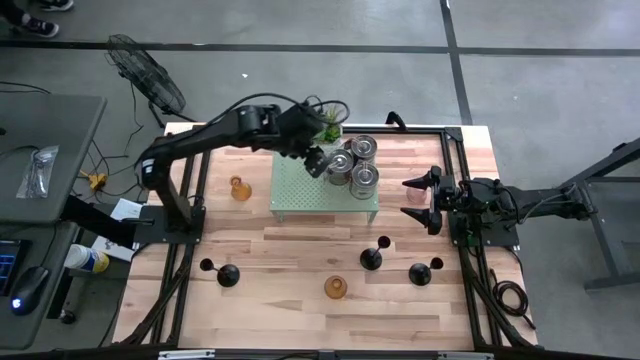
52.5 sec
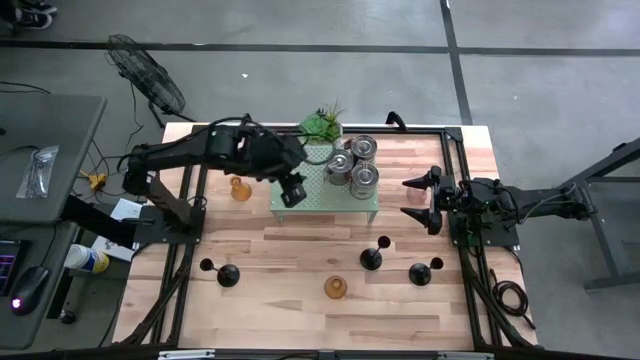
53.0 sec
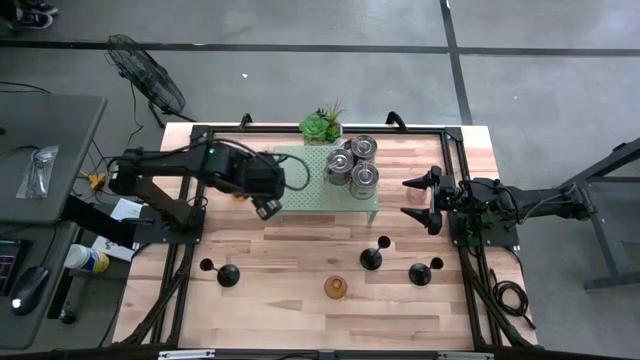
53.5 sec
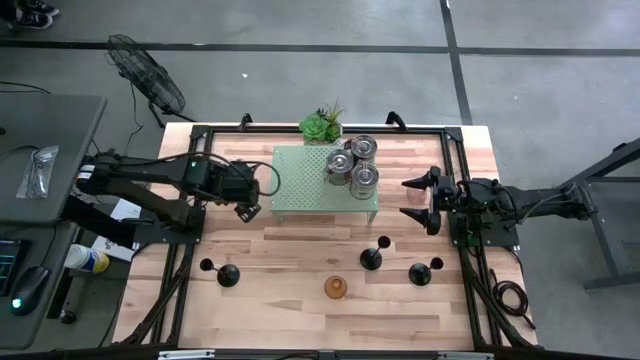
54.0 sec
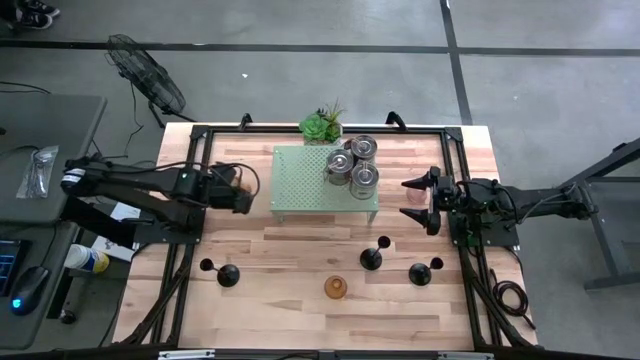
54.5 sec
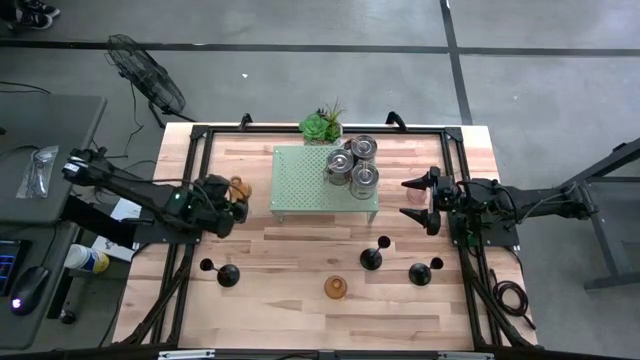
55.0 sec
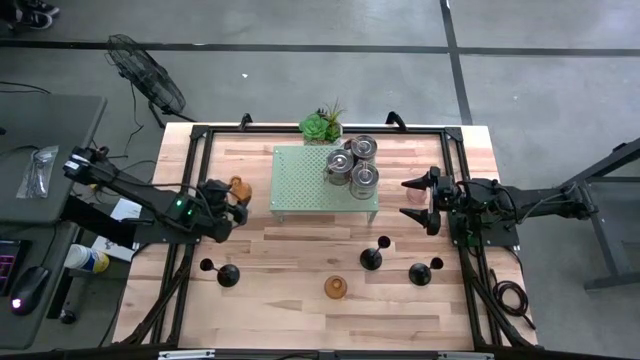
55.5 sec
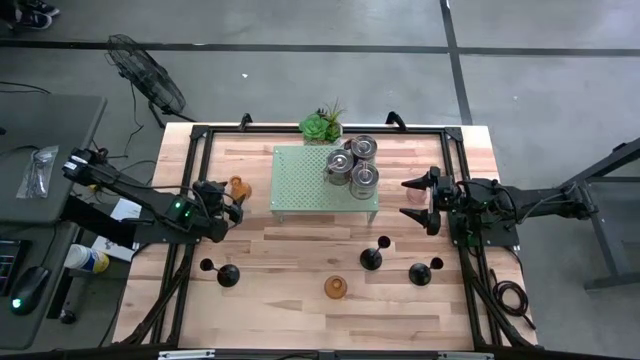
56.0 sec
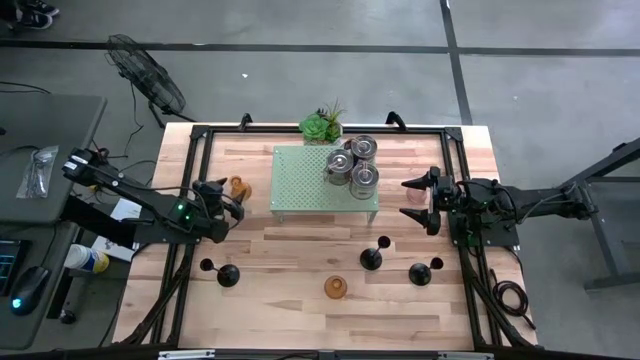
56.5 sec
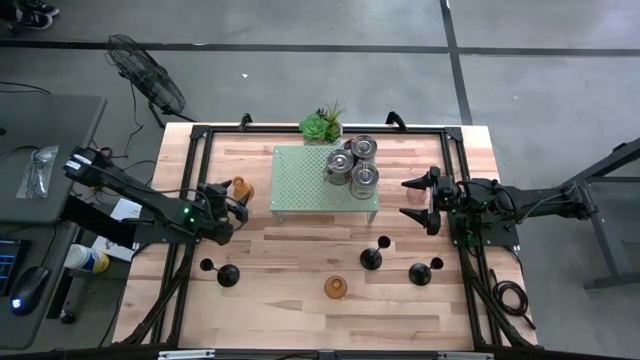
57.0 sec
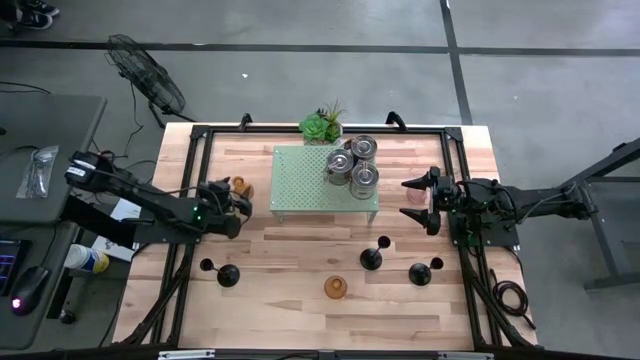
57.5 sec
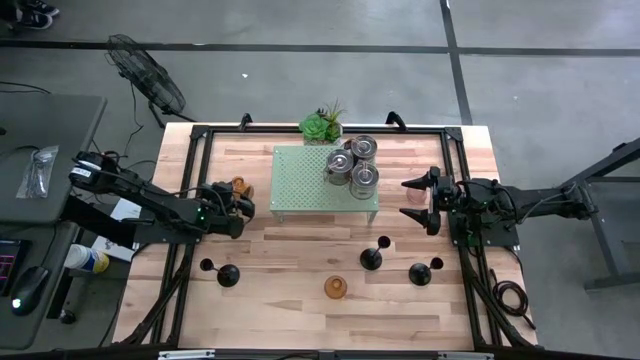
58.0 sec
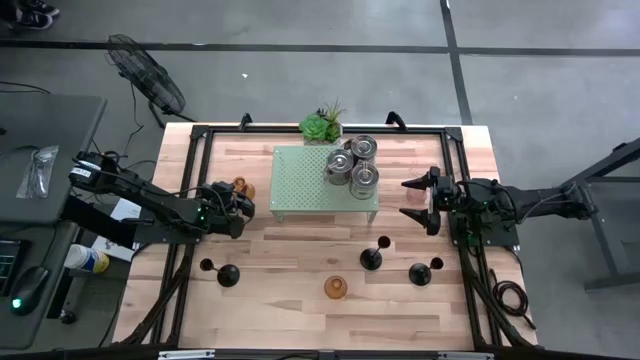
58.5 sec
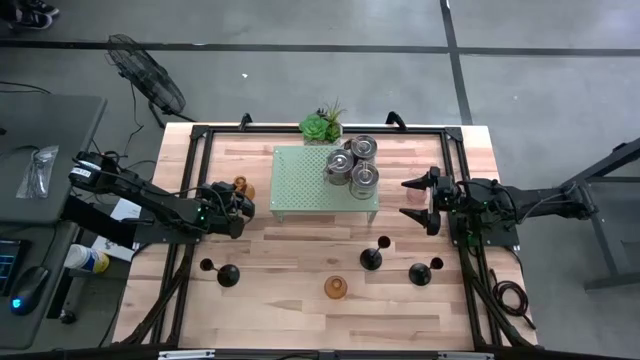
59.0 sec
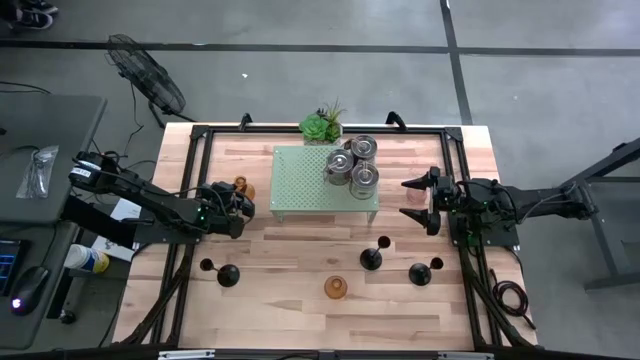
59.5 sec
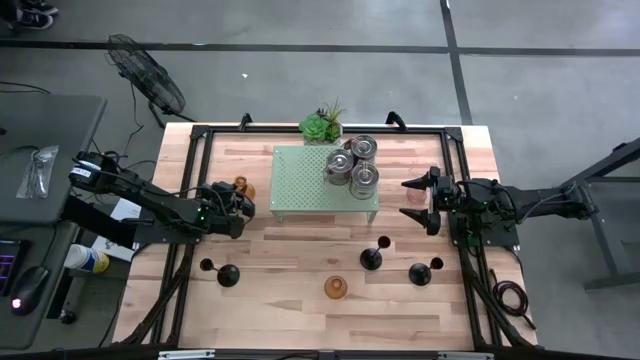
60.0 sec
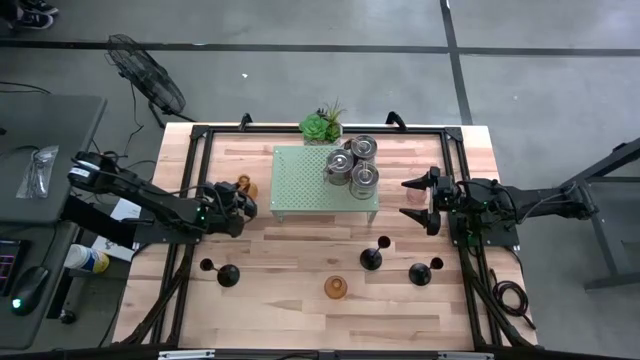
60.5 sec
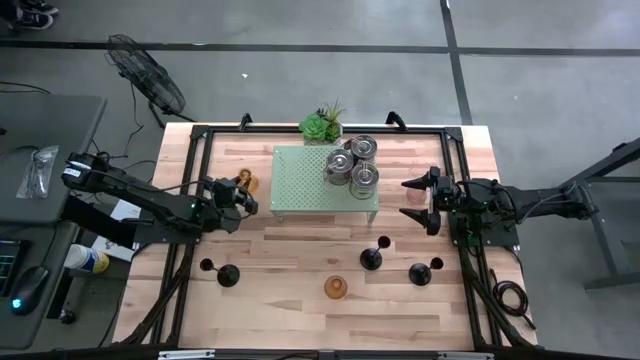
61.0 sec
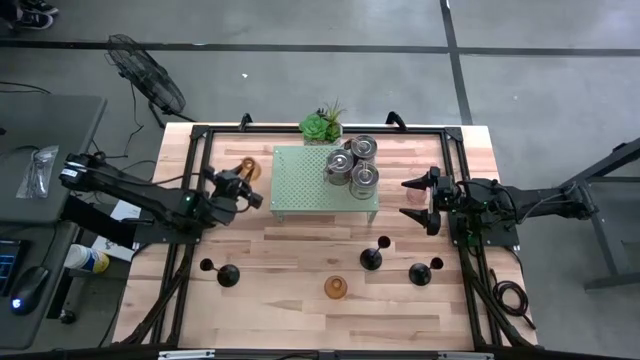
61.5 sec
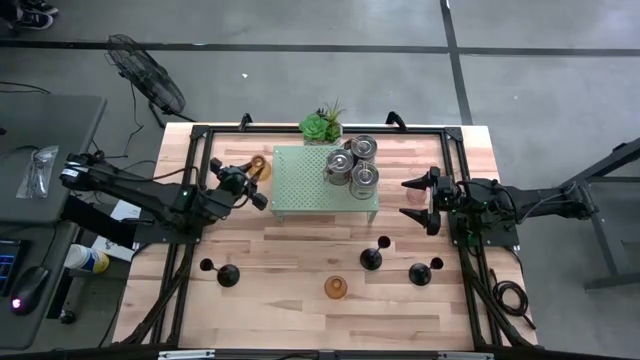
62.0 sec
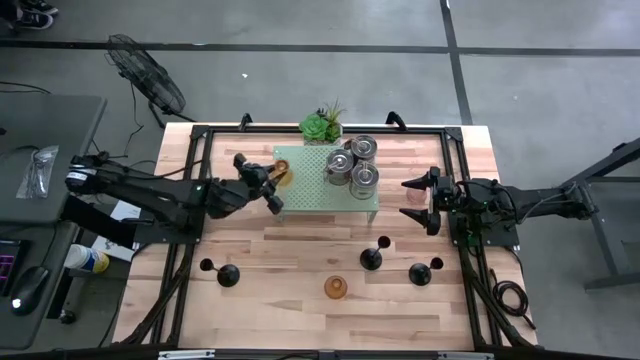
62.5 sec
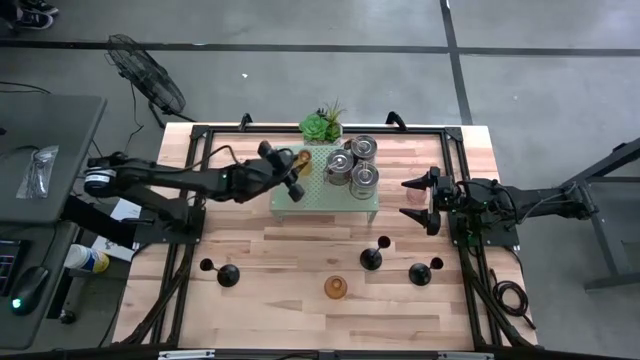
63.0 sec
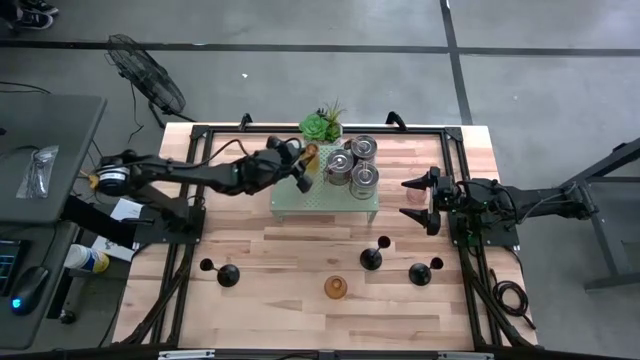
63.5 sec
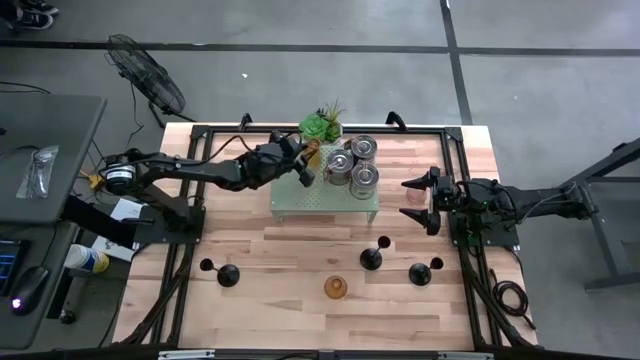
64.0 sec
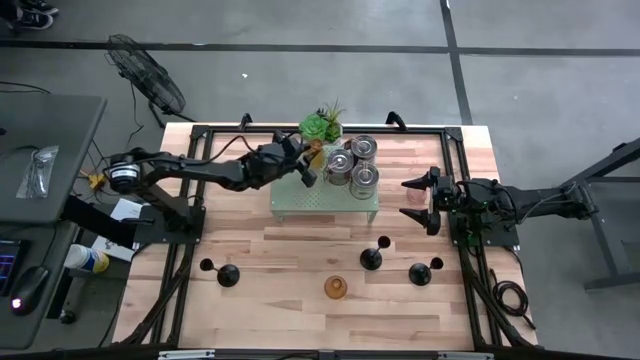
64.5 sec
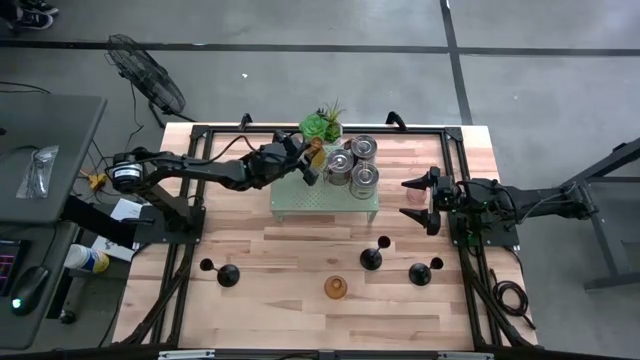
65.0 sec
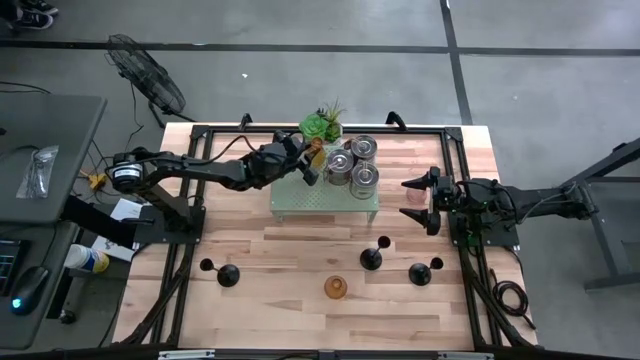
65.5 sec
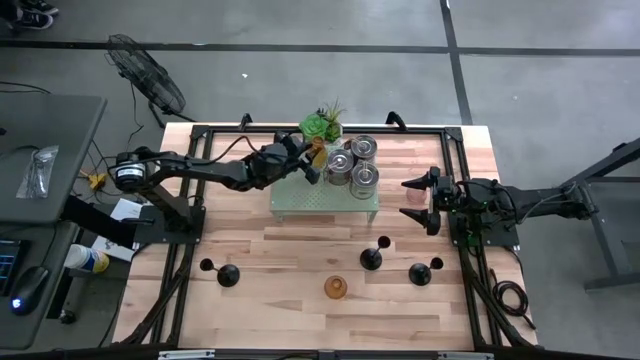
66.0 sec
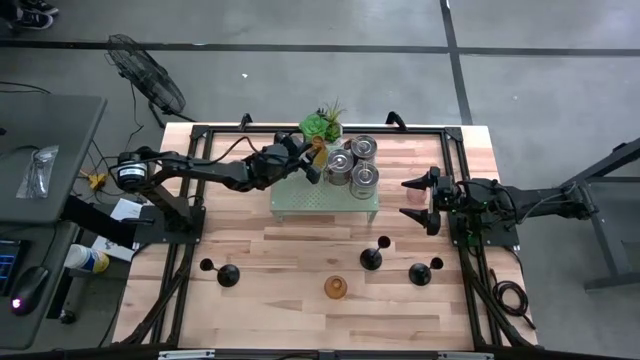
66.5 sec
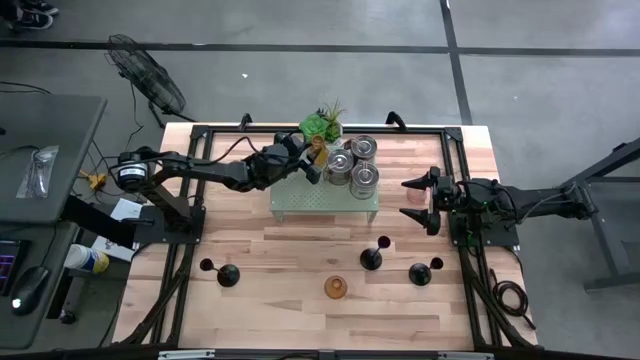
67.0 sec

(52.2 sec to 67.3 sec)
Task: Pick & Place candle stick holders
Put the top gold glass candle holder on the shelf

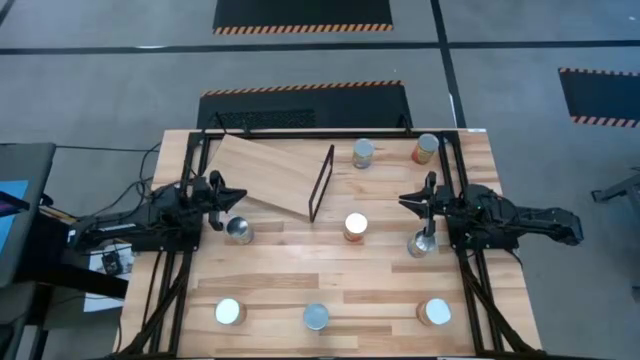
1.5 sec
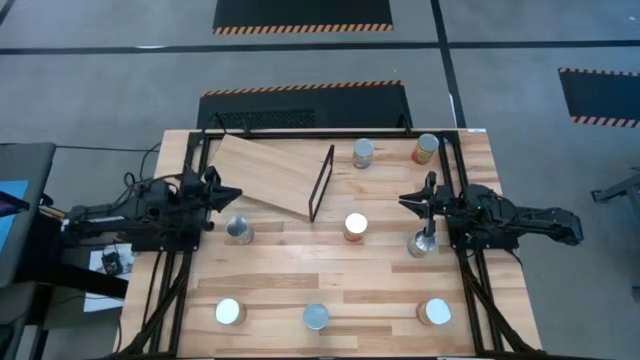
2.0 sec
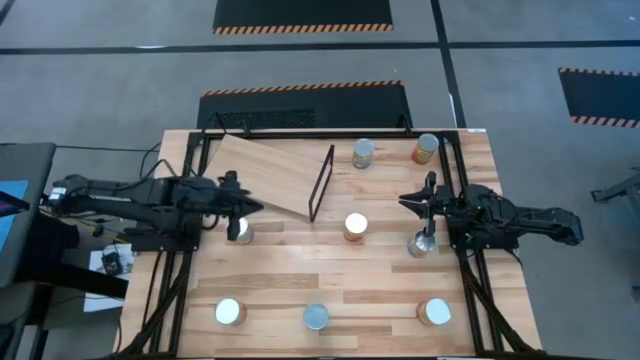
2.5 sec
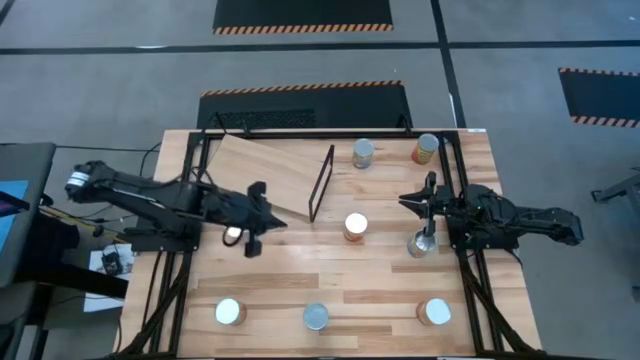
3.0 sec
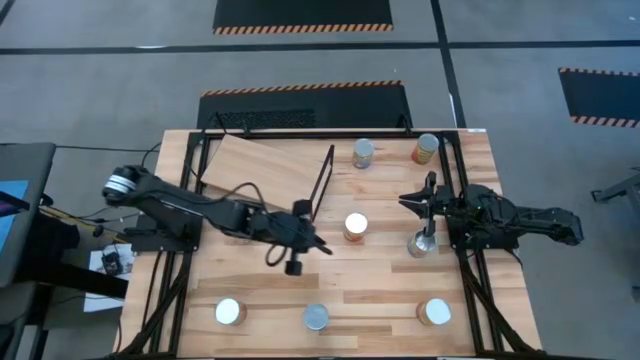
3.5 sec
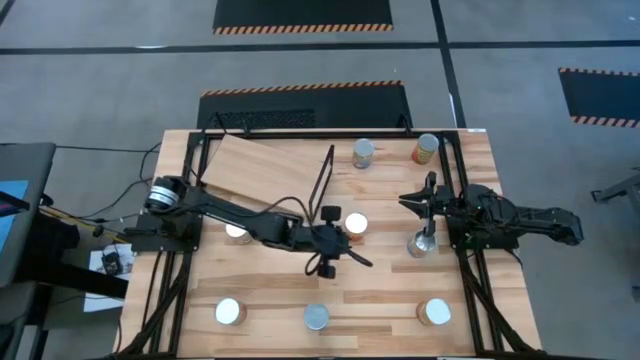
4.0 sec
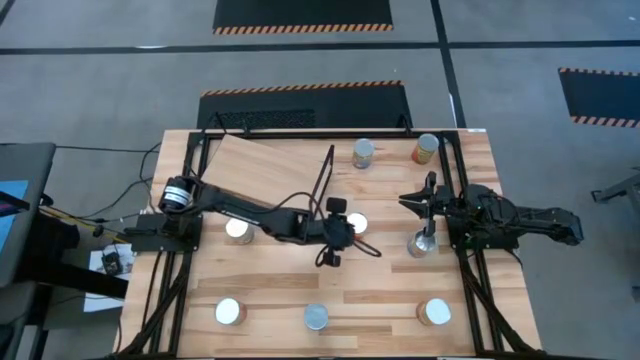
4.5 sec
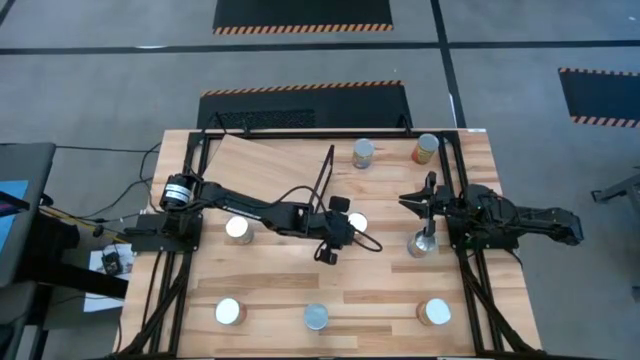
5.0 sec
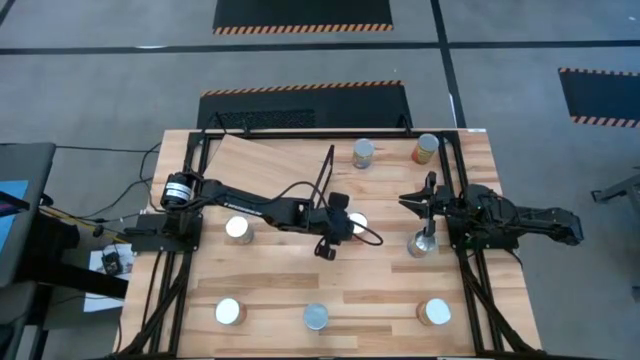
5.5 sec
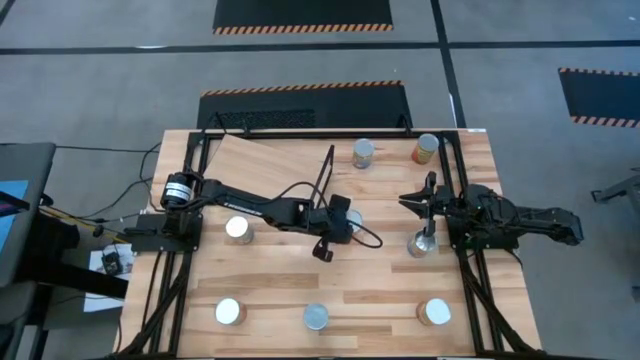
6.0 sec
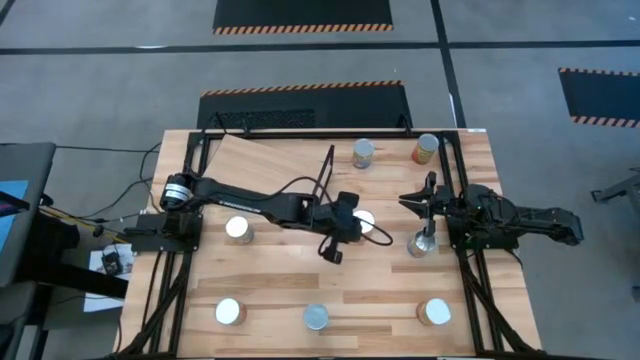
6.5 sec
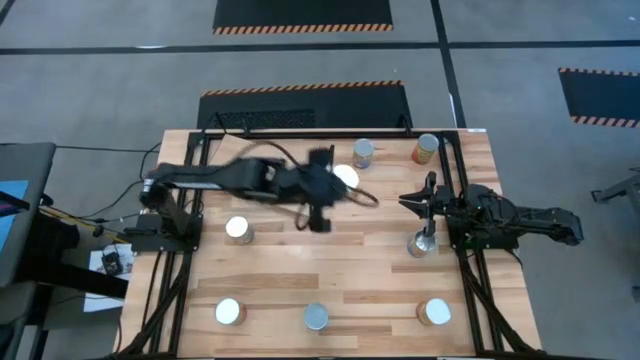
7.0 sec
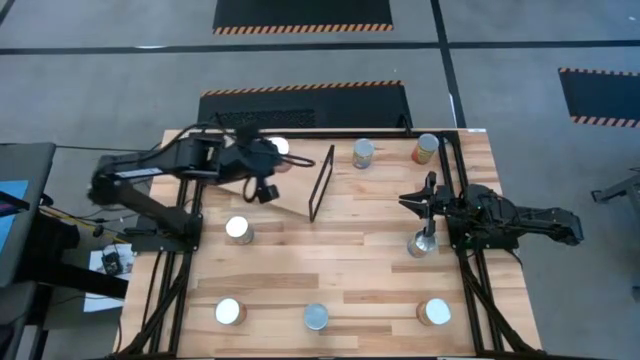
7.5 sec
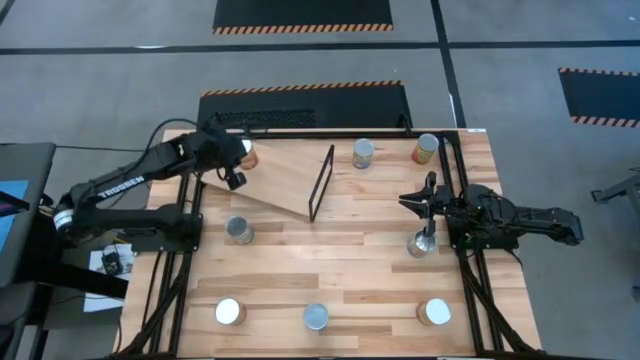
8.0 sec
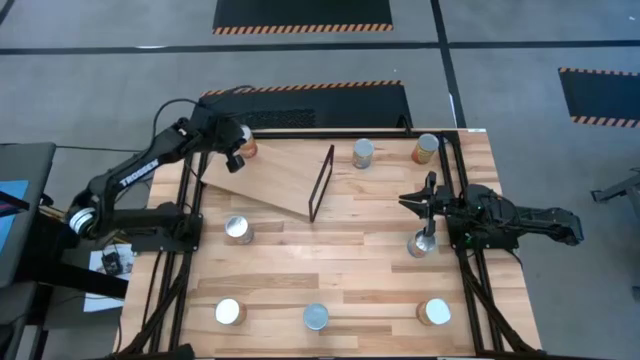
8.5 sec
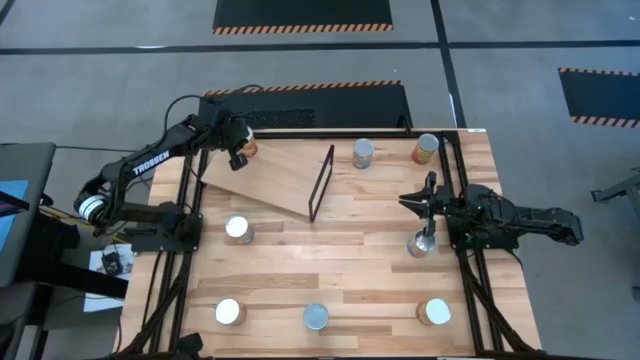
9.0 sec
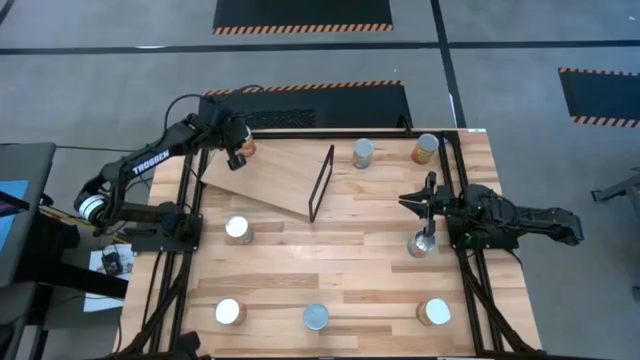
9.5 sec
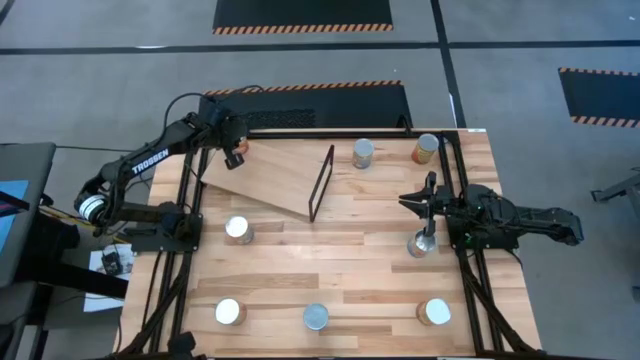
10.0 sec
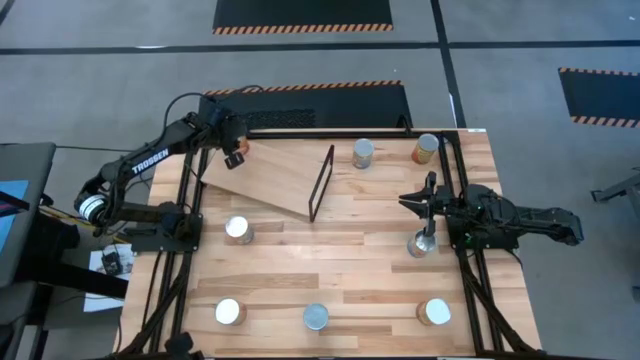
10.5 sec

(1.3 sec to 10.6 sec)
Task: Pick and place cans onto a shelf
Put the top canned corn on the shelf
